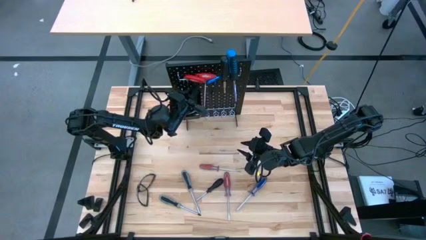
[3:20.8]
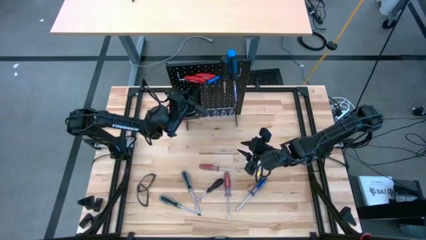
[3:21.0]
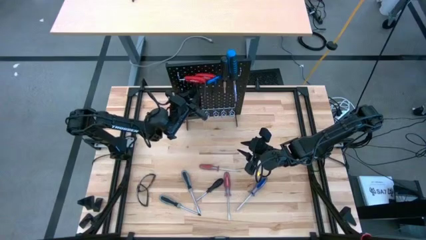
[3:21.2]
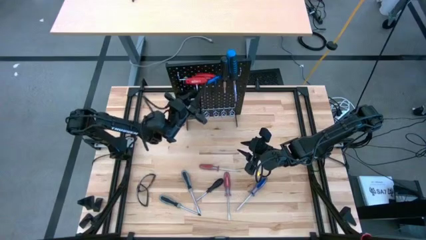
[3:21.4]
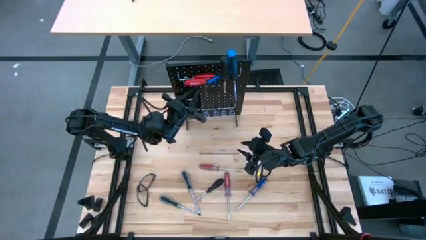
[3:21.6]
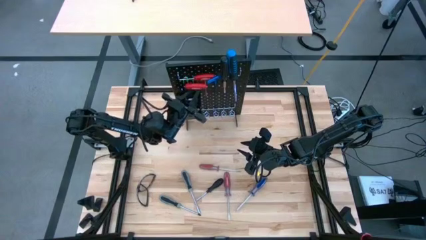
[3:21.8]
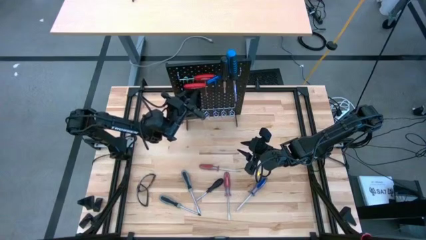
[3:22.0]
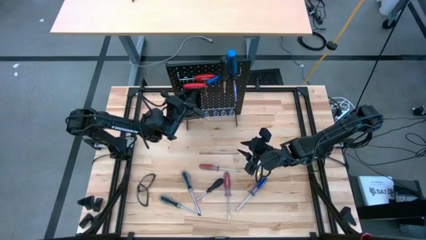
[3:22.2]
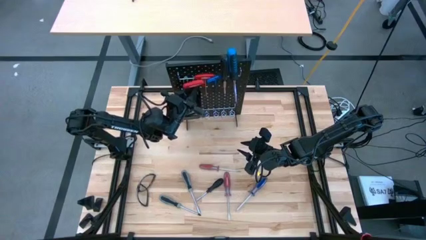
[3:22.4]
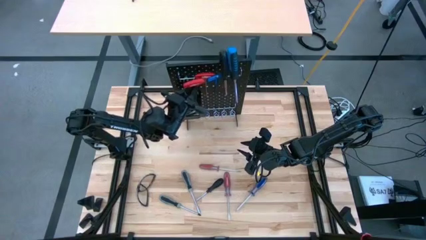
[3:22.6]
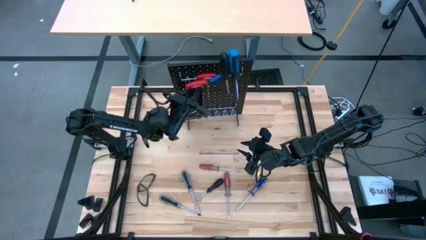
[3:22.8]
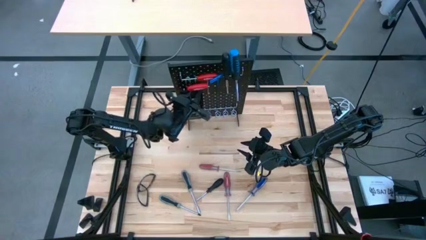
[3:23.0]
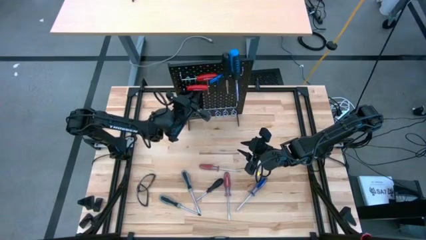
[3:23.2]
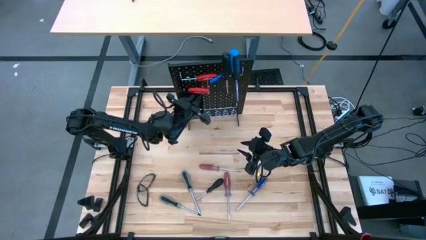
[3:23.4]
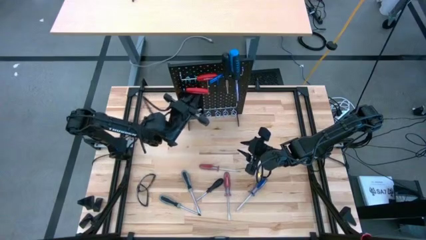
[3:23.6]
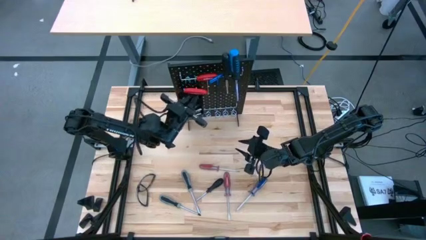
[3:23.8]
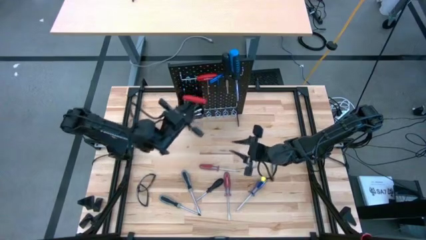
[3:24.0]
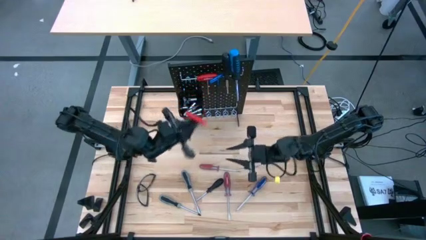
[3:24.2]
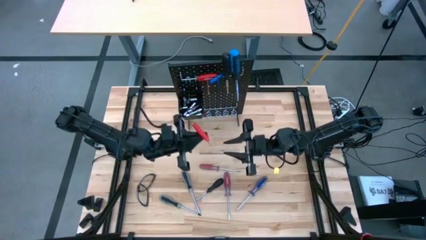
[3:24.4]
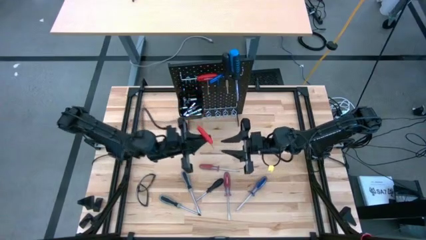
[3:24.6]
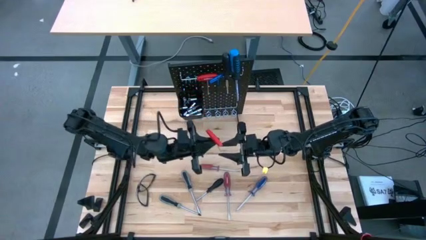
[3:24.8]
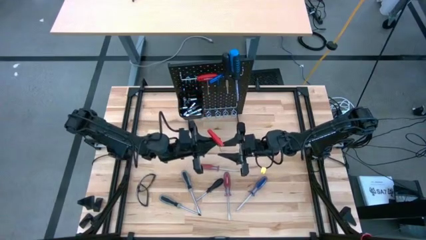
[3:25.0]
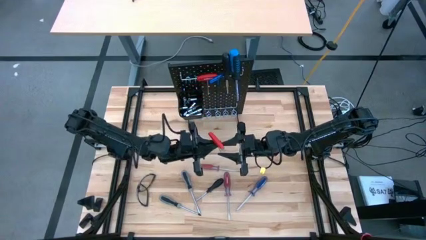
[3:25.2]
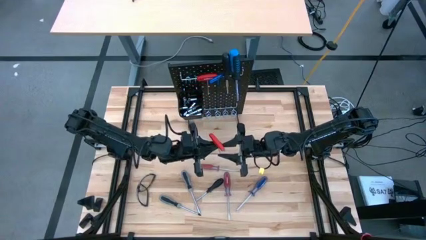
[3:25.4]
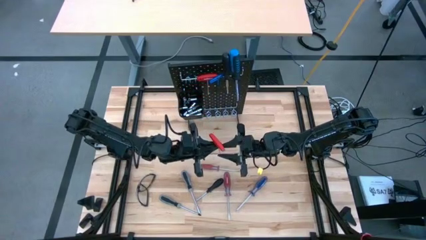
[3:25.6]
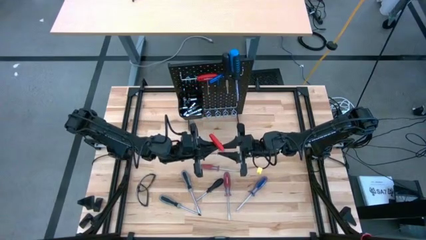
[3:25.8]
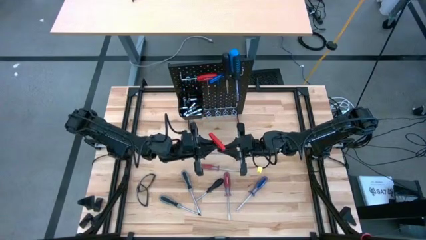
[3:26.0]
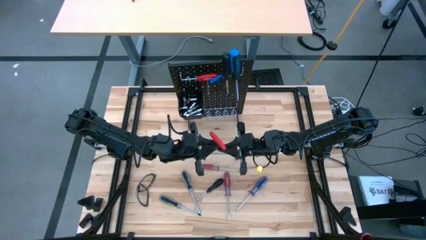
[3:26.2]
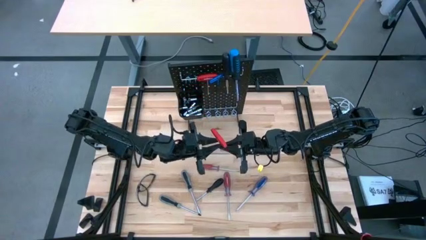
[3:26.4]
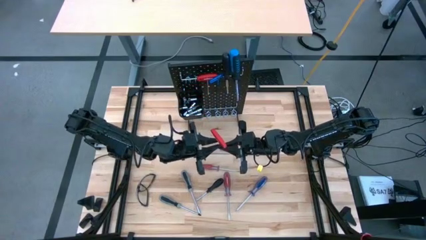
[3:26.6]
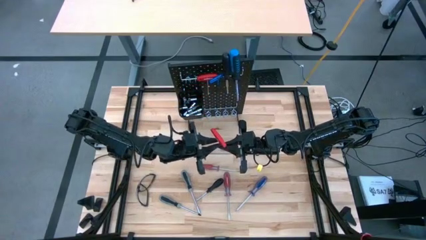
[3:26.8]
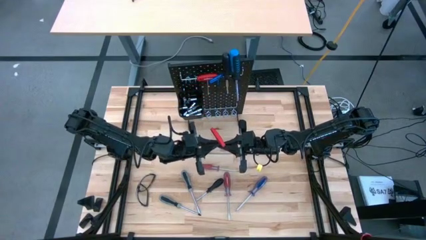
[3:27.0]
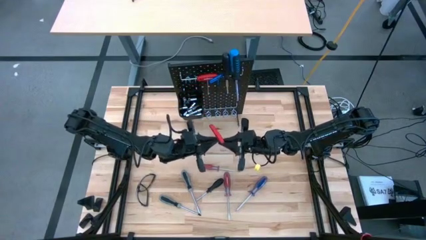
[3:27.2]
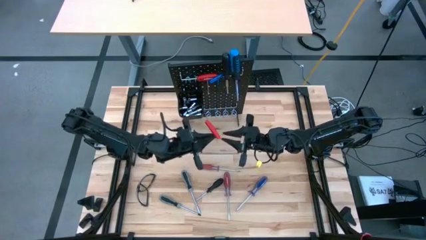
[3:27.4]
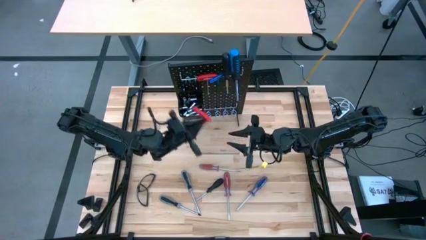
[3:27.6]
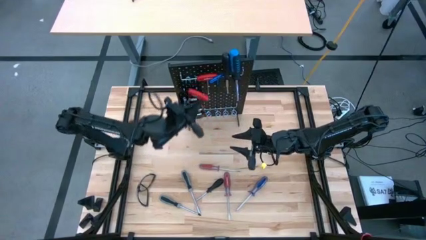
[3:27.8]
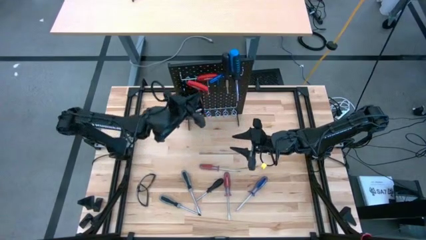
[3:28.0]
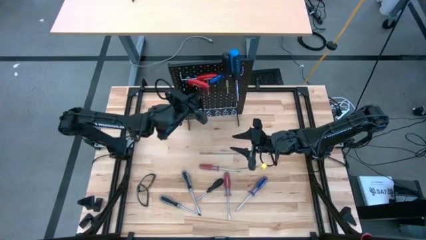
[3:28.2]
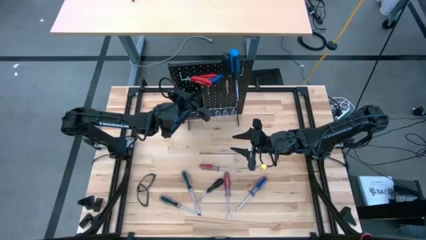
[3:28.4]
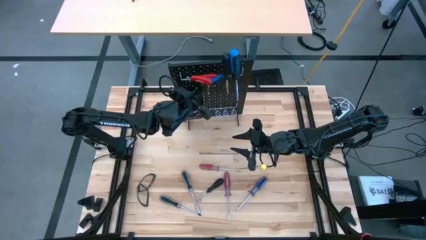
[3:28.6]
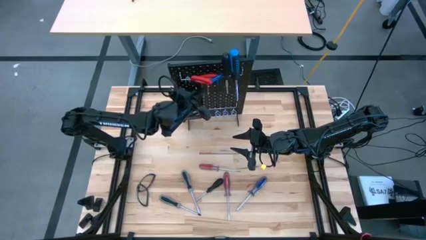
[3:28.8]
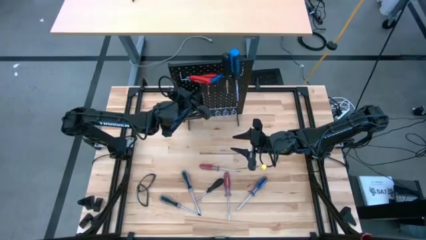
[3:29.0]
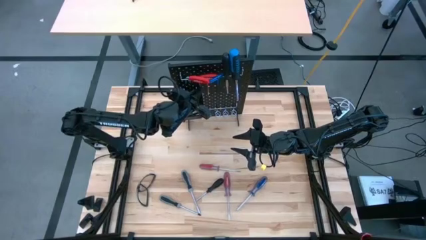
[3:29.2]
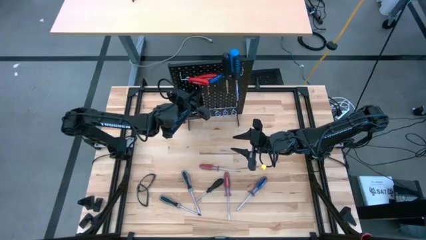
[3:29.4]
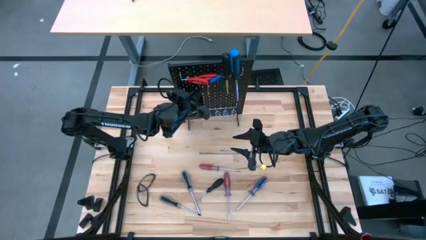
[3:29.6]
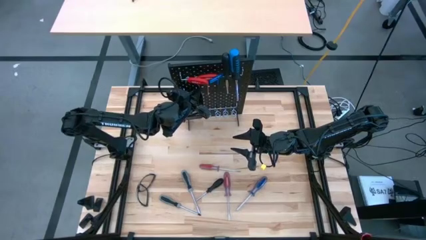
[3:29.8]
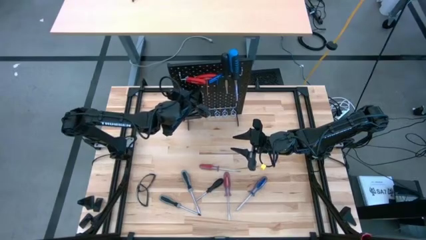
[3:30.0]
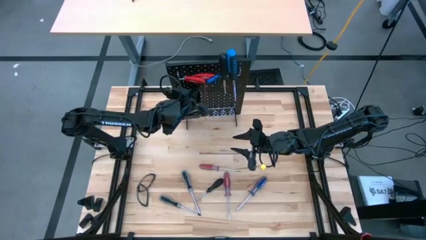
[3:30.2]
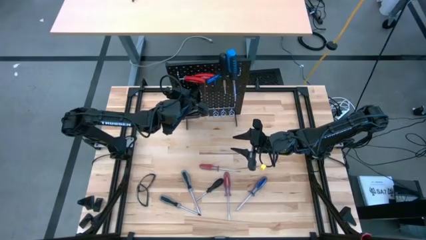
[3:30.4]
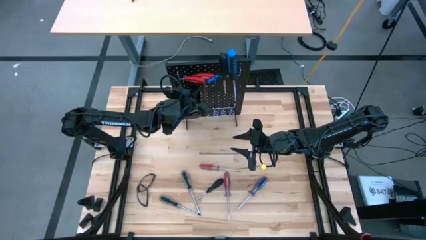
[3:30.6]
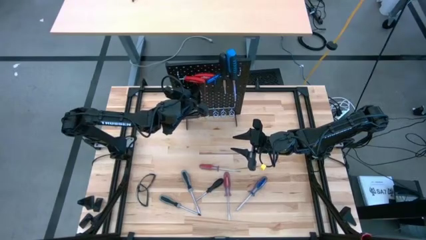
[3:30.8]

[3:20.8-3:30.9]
Task: Hang tools onto peg board
Hang the red allen wrench on the pegboard

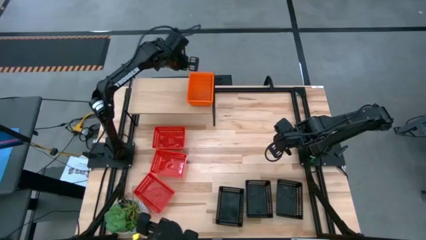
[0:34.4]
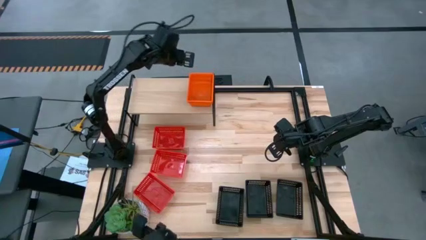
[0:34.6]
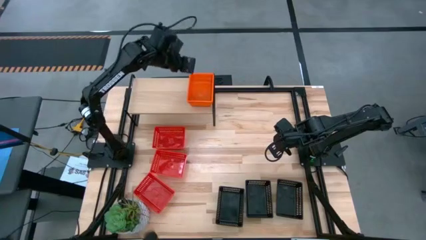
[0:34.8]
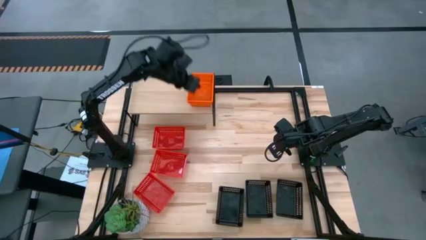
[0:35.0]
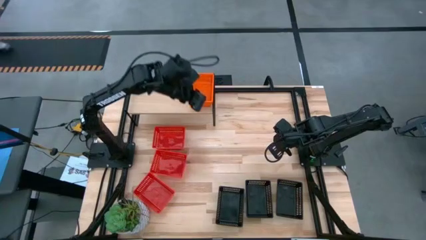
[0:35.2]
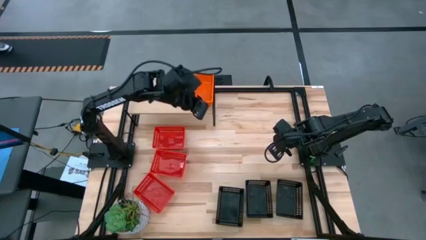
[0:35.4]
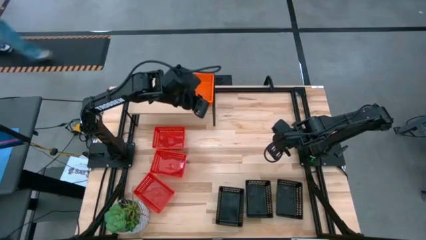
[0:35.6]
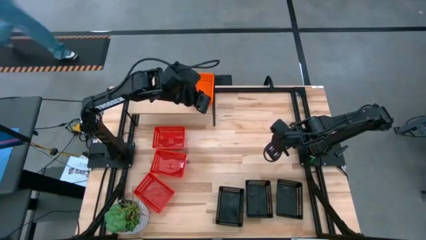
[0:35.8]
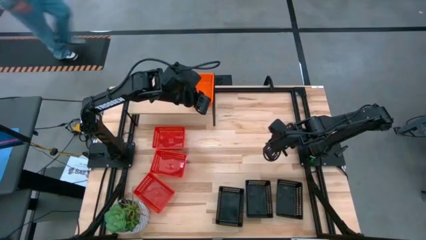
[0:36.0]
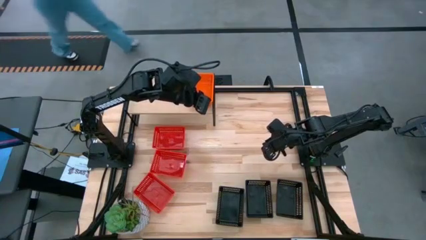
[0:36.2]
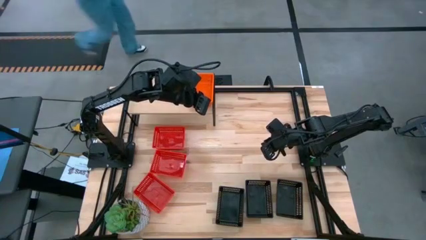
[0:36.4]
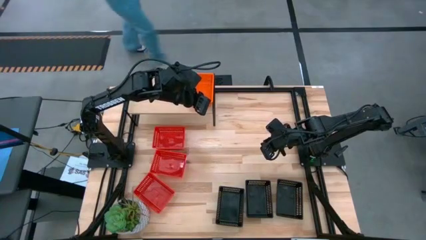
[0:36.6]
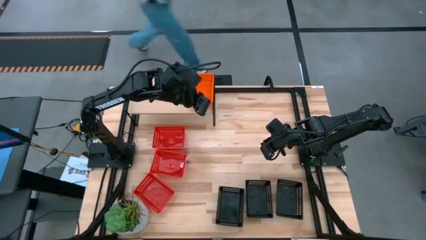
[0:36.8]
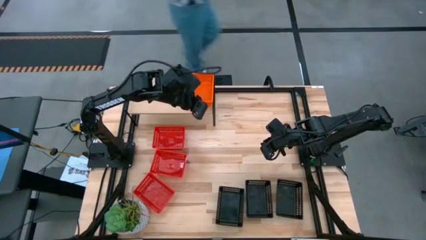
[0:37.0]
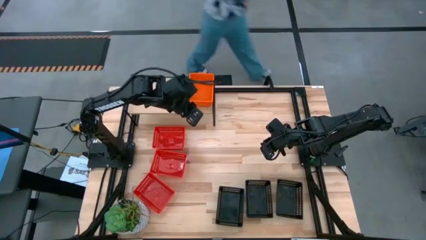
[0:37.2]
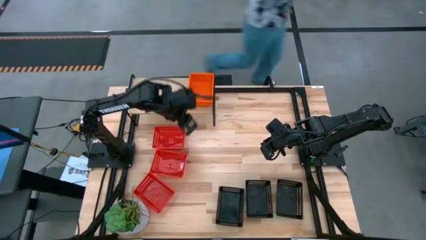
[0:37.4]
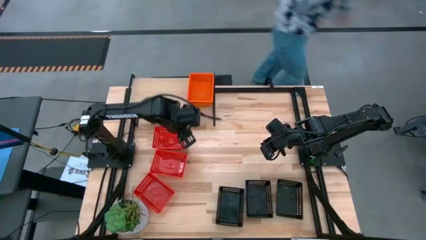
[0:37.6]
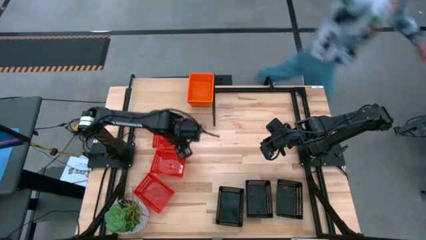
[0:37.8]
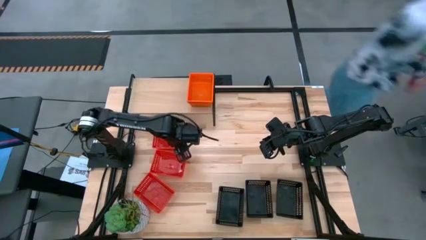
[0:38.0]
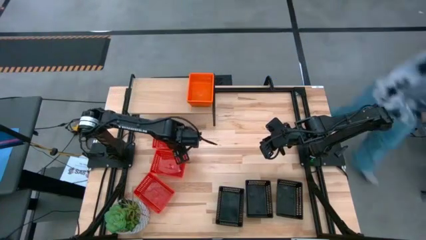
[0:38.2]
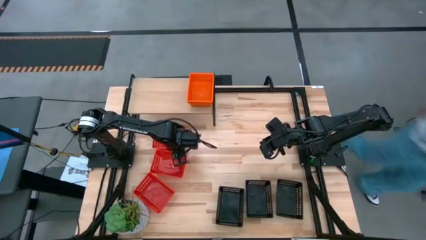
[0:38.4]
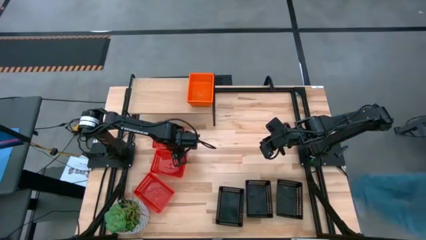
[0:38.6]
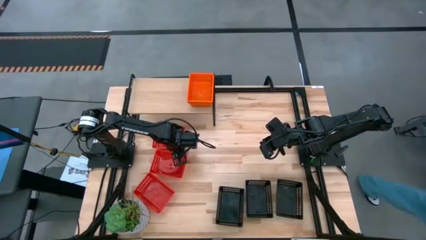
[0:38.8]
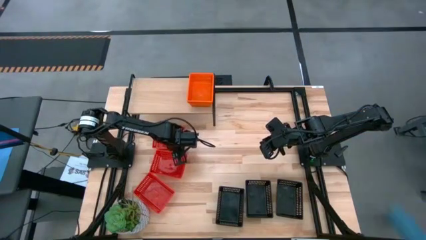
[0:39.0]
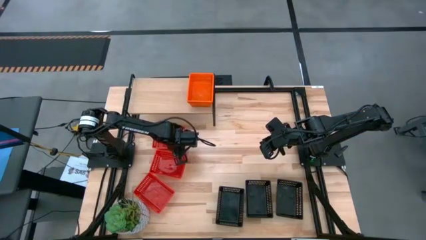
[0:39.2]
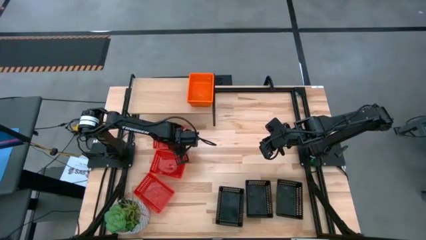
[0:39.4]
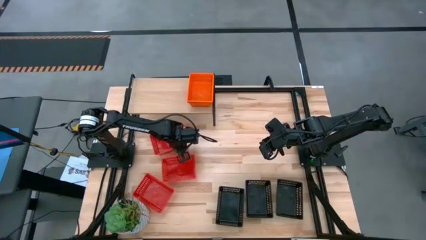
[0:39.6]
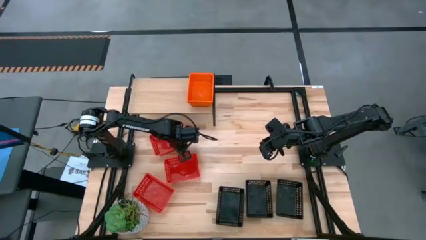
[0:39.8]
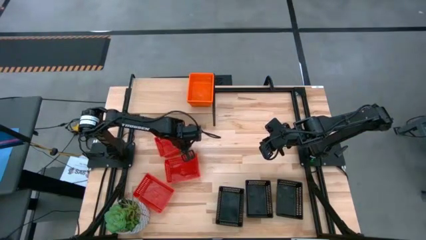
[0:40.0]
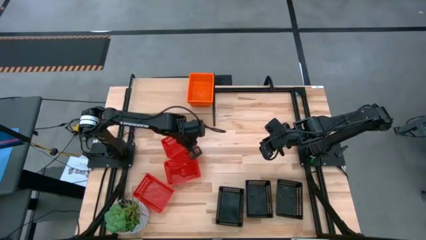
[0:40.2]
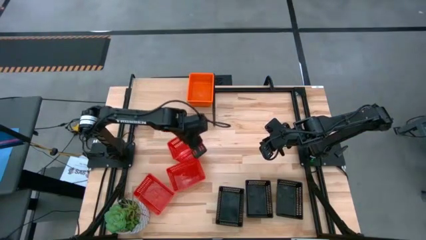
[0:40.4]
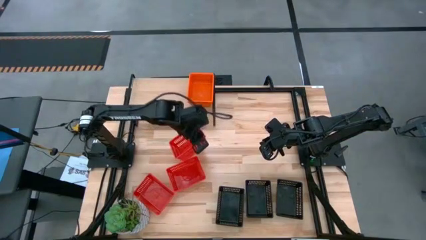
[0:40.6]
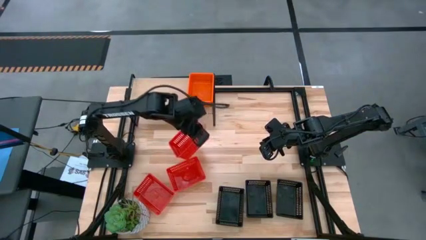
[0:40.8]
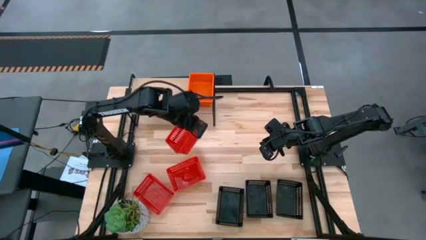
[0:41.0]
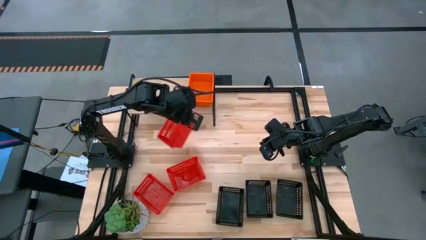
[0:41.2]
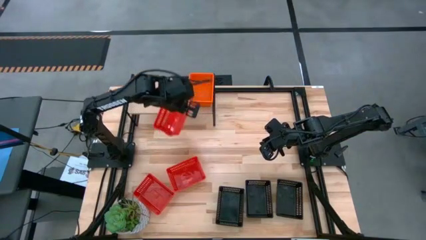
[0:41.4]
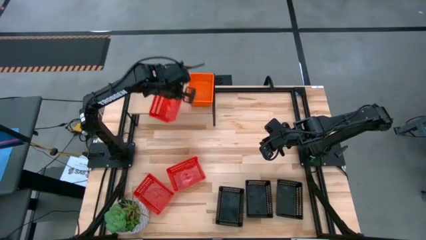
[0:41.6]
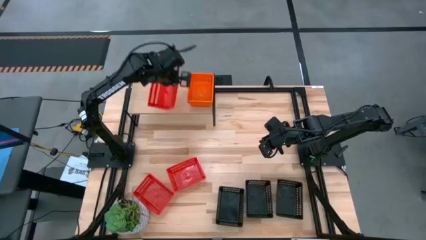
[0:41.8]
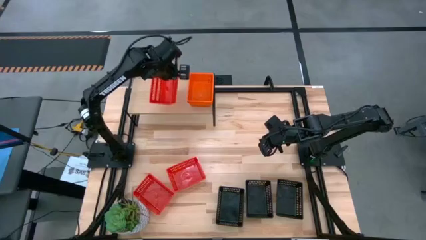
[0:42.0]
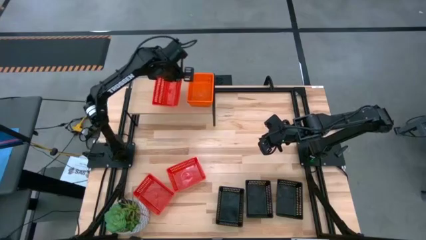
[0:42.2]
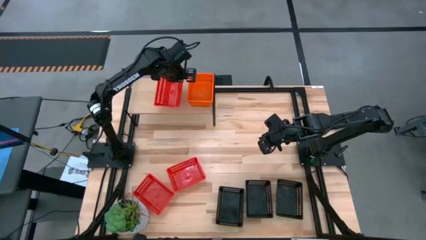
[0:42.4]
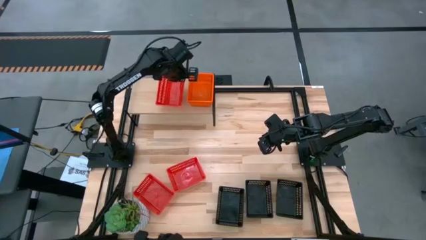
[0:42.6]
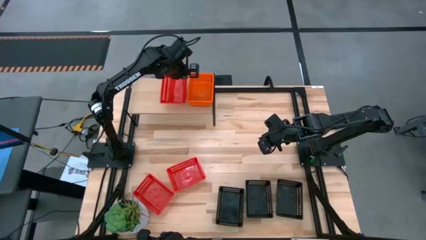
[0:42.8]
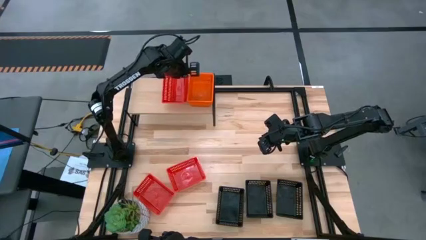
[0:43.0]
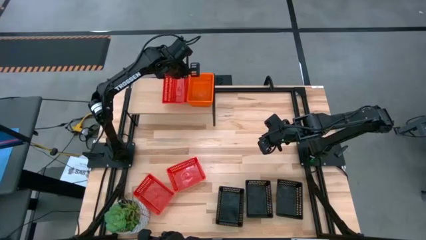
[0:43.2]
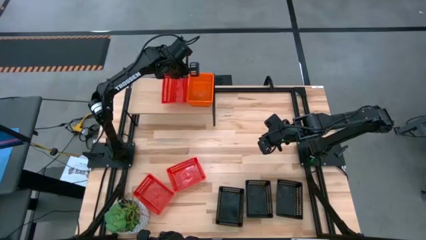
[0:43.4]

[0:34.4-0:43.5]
Task: Stack baskets on shelf by color
Put the top red bin on the shelf
